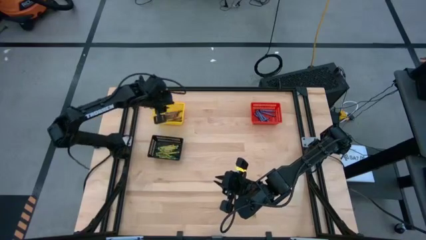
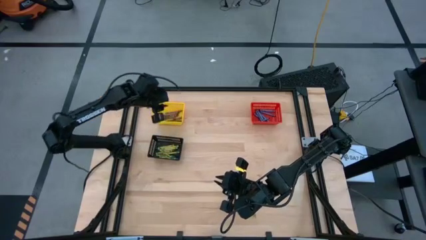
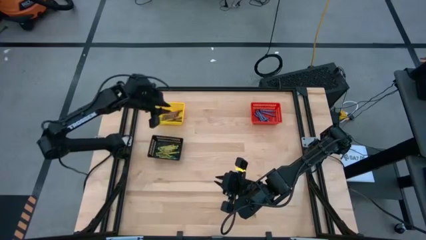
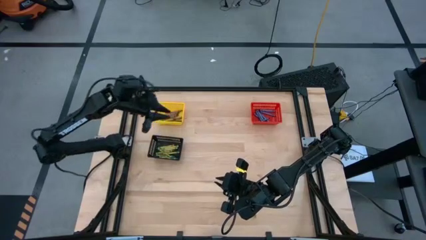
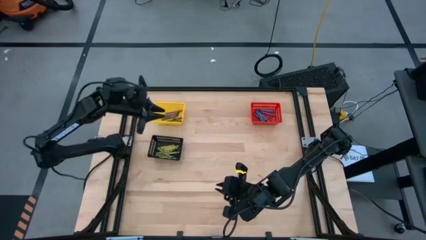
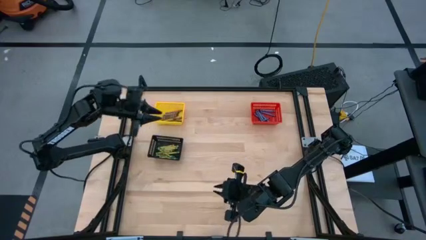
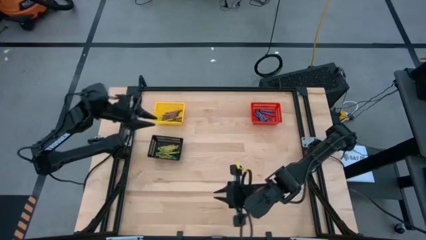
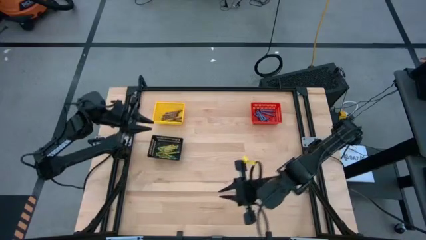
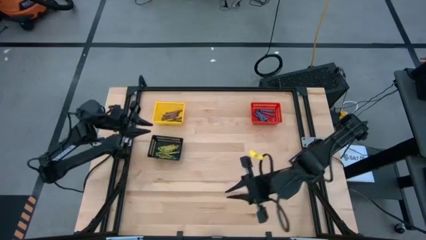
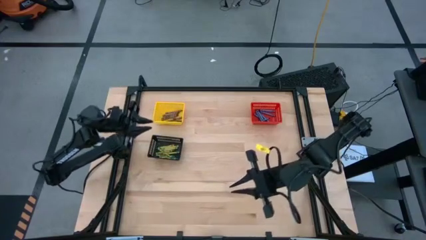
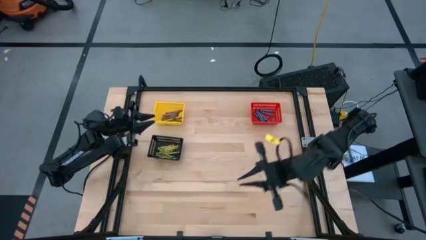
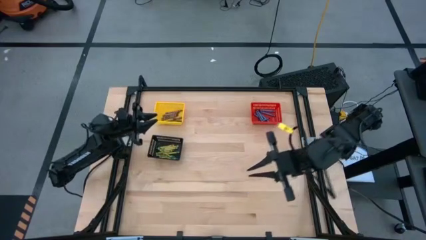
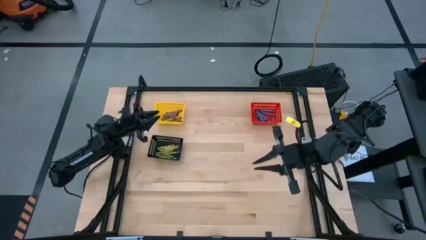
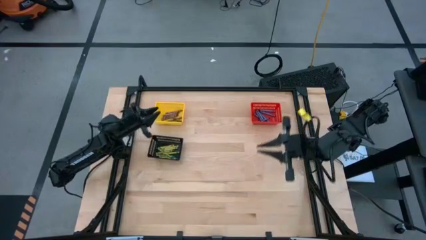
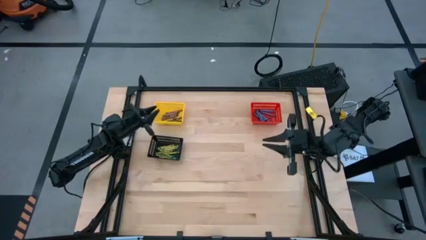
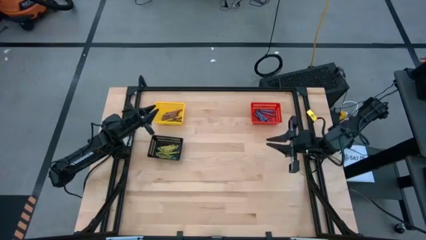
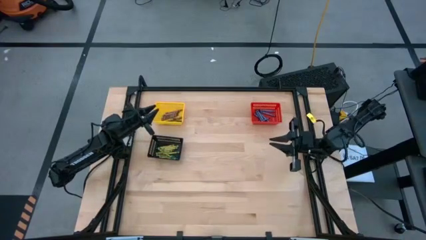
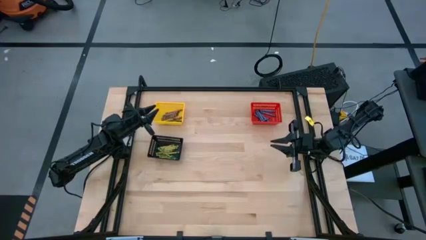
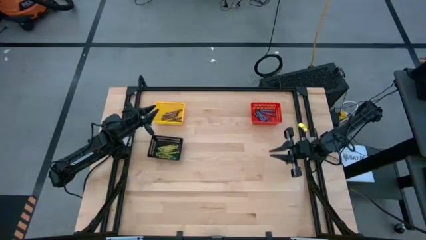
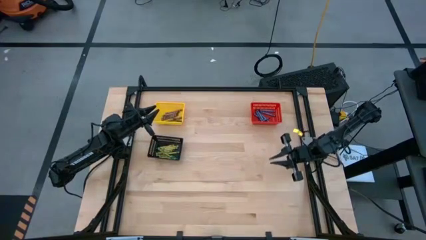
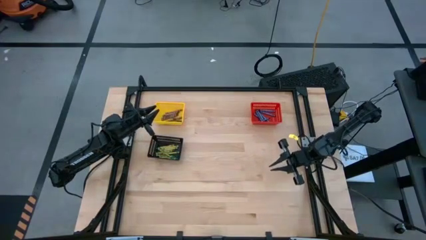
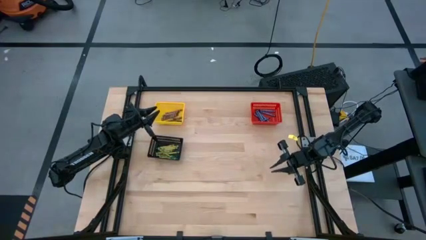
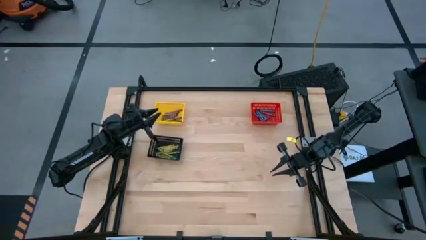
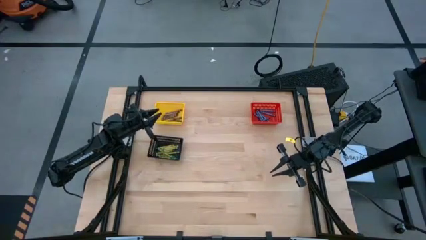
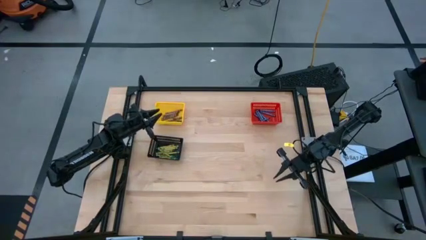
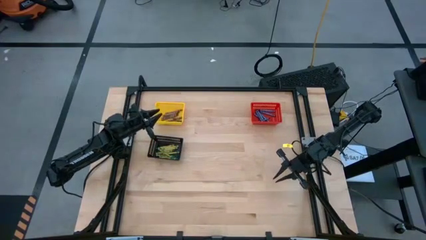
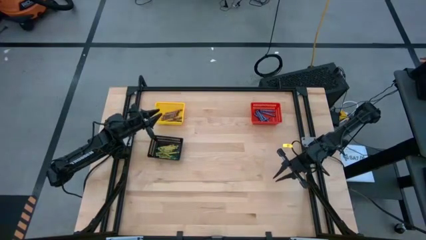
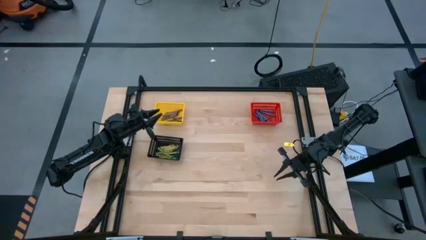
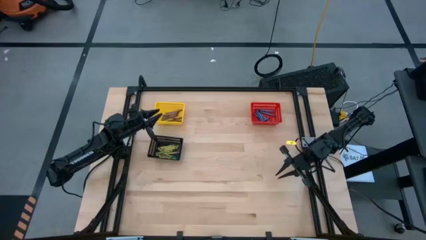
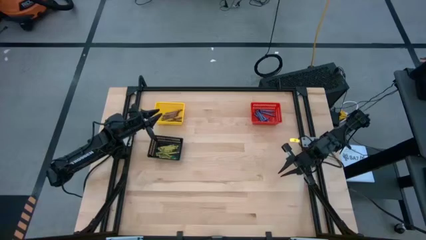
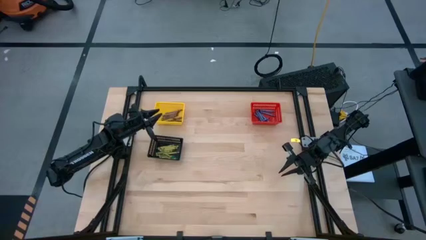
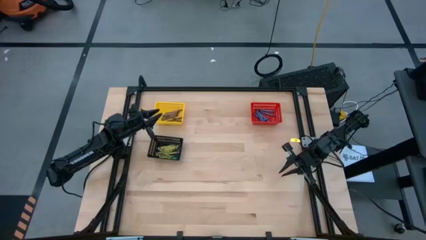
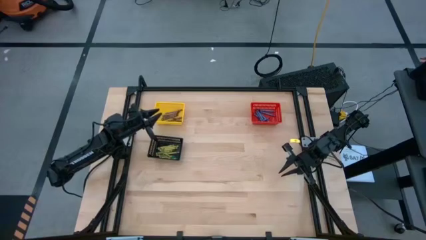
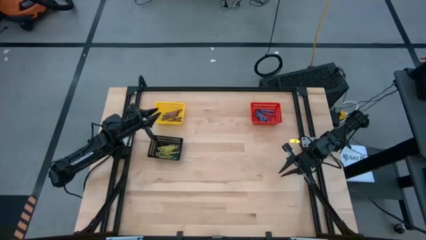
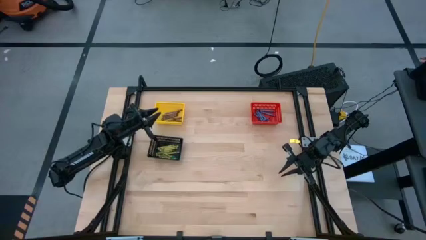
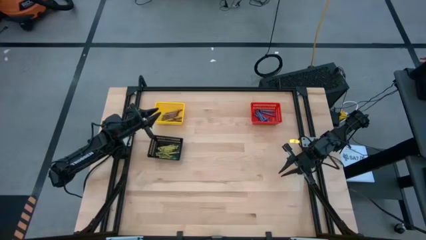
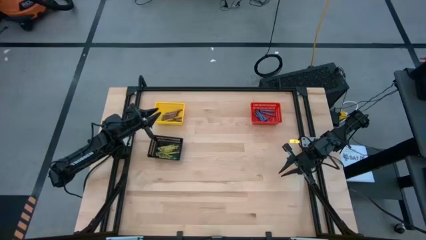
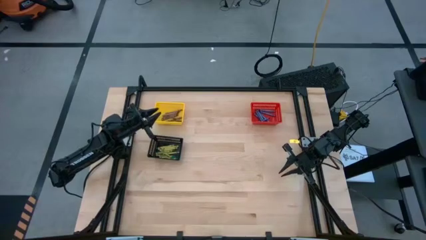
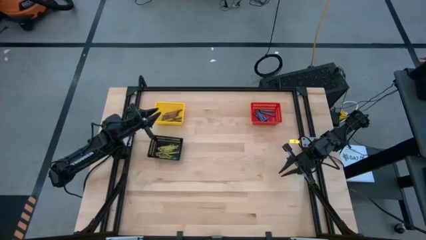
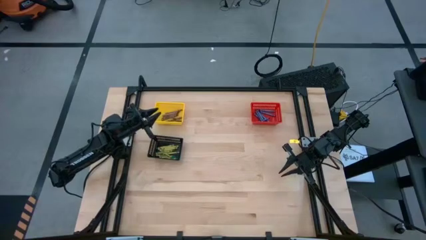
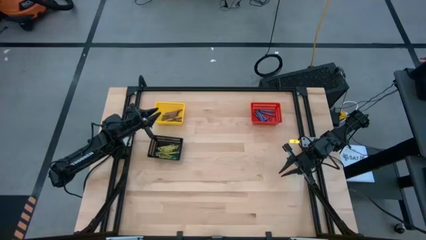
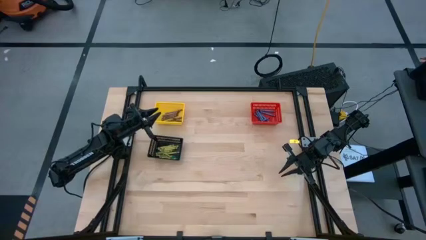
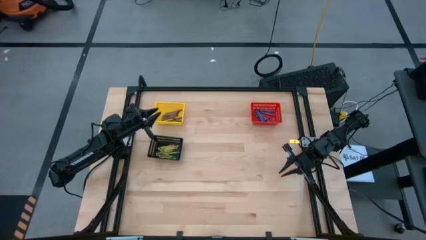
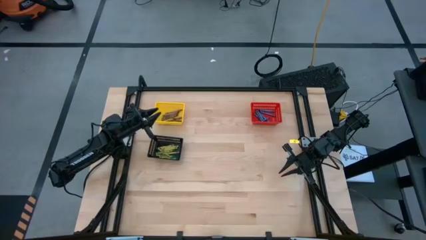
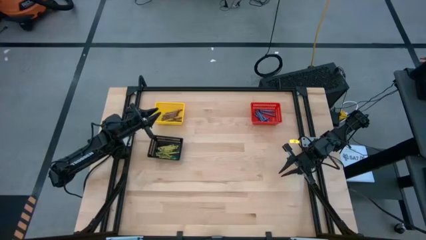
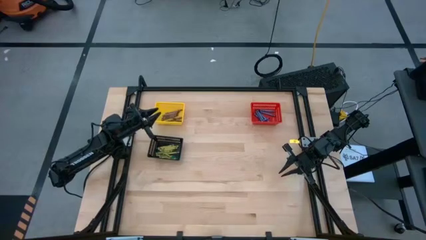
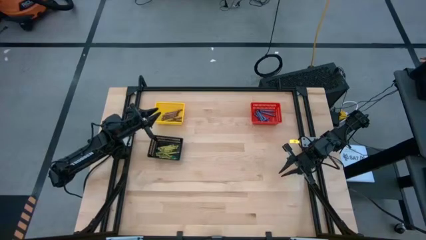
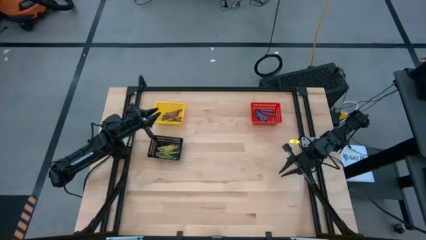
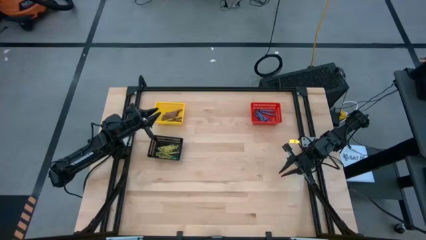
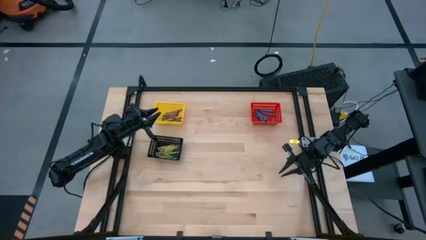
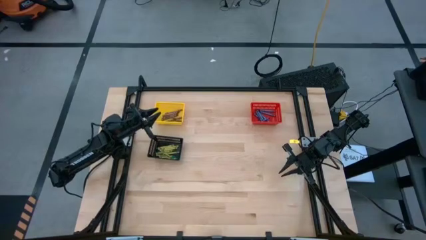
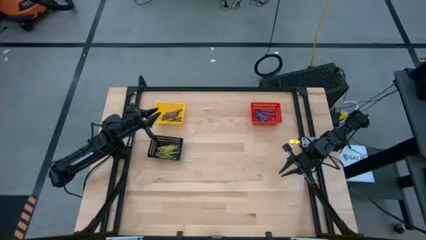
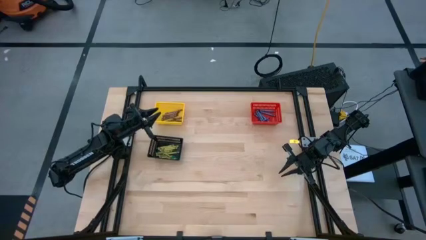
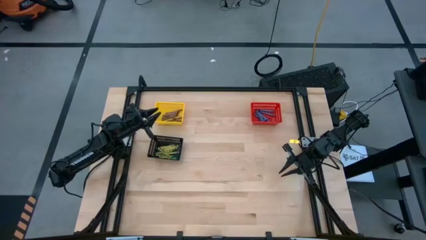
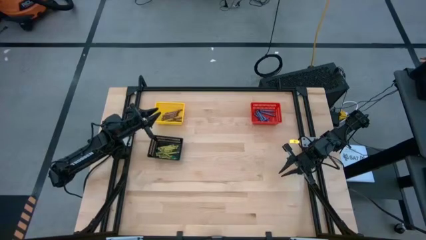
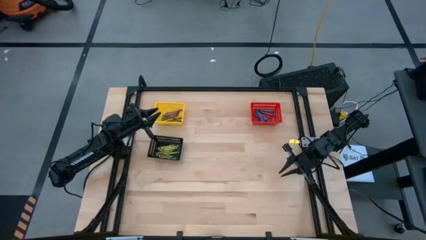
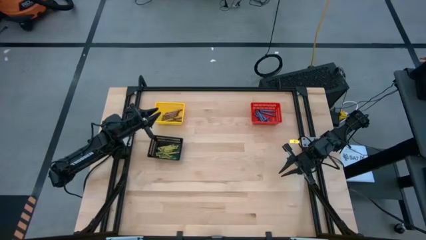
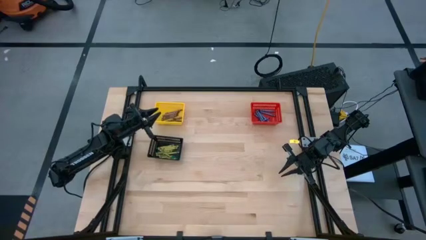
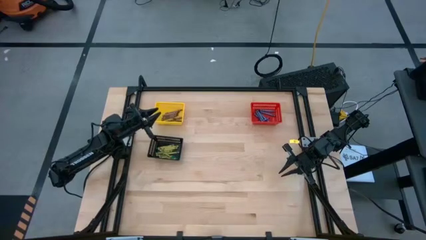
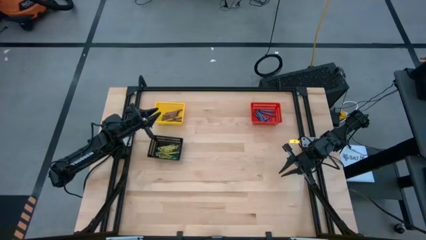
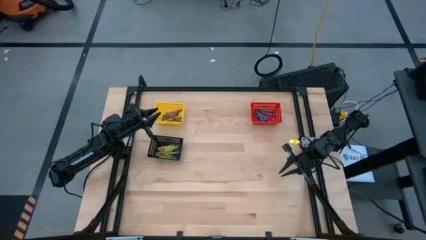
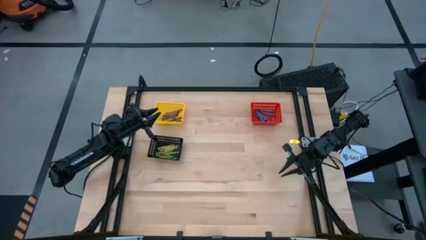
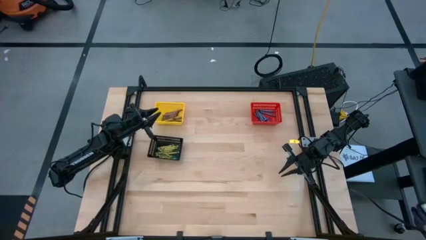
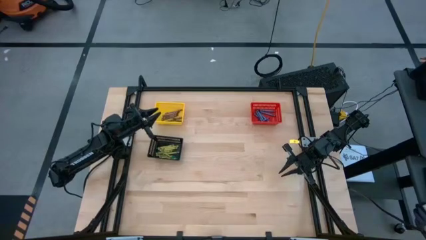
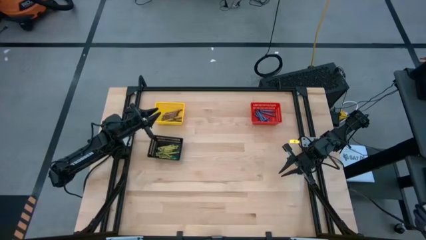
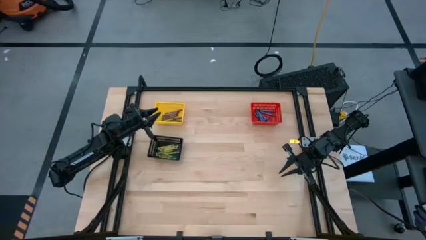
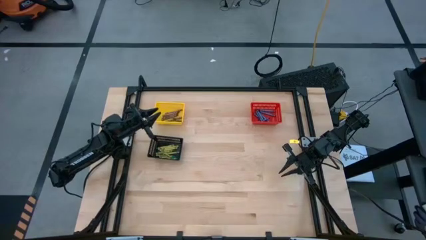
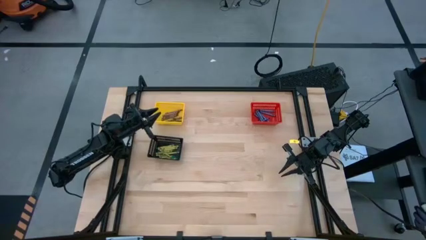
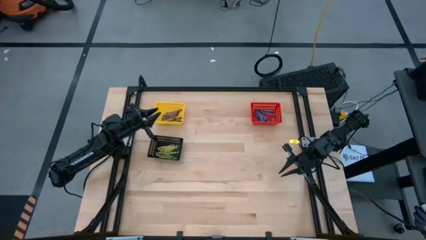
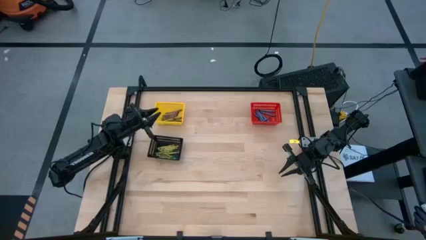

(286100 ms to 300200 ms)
Task: Sort crayons
Return to Home Position
